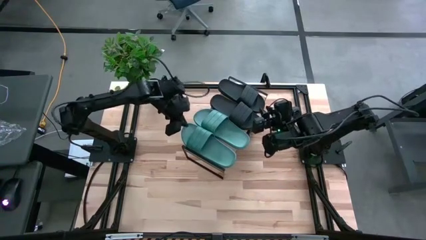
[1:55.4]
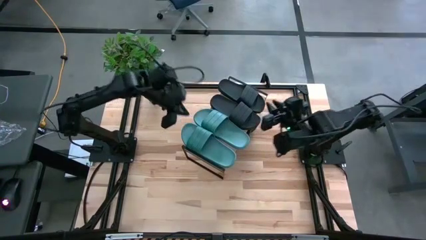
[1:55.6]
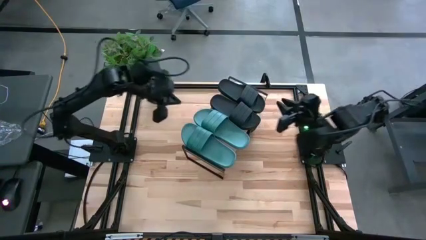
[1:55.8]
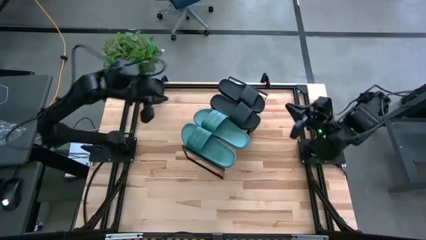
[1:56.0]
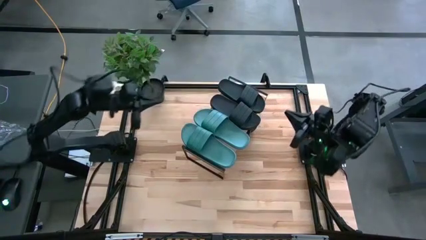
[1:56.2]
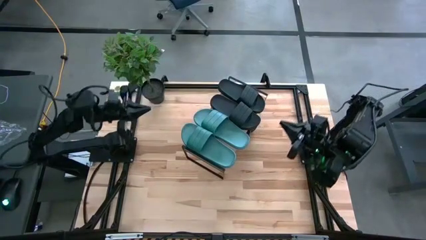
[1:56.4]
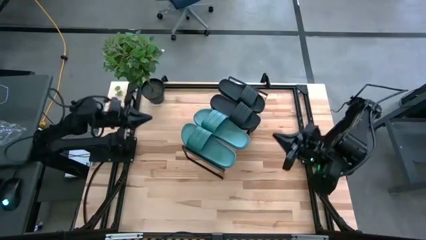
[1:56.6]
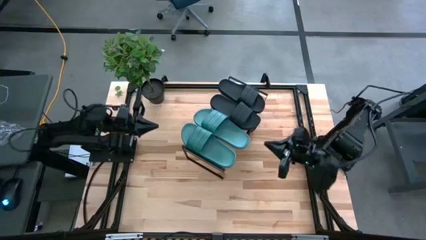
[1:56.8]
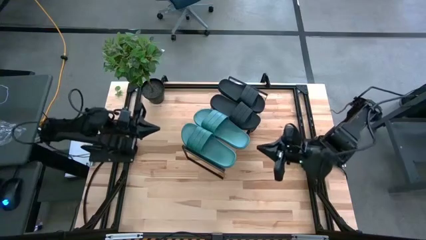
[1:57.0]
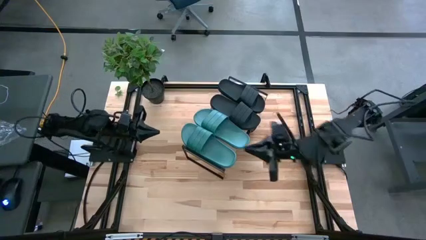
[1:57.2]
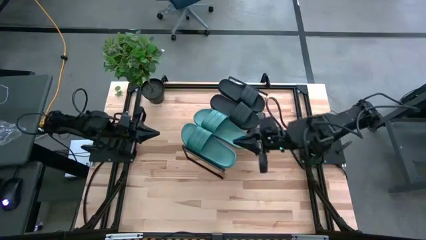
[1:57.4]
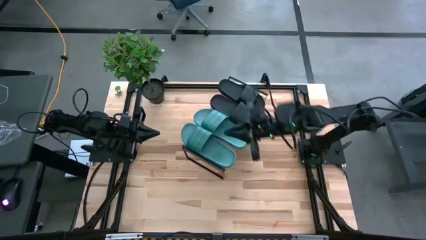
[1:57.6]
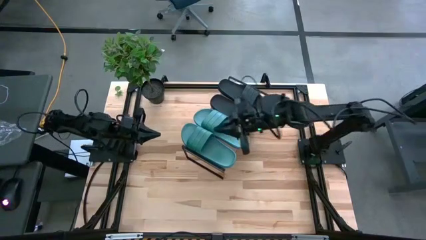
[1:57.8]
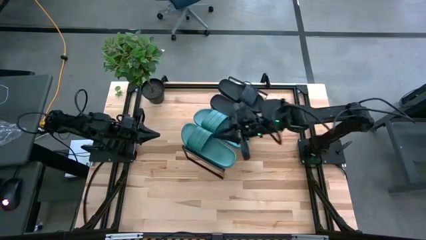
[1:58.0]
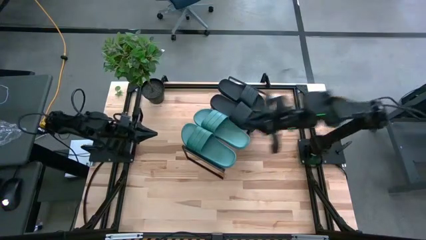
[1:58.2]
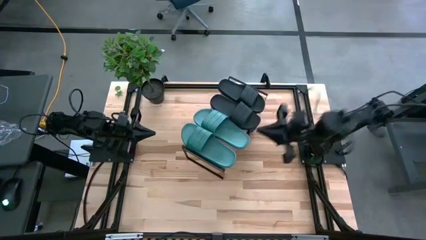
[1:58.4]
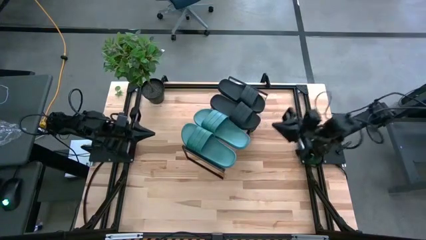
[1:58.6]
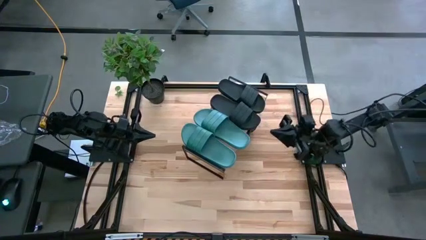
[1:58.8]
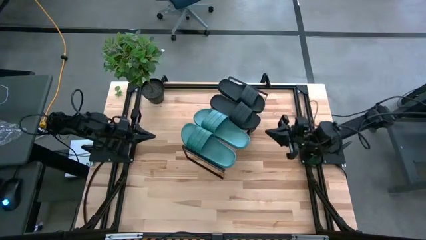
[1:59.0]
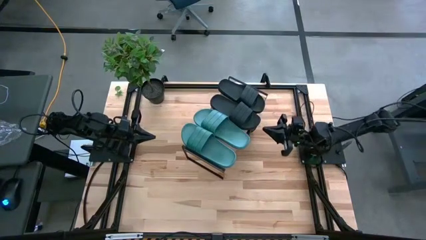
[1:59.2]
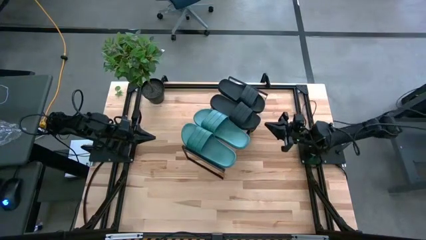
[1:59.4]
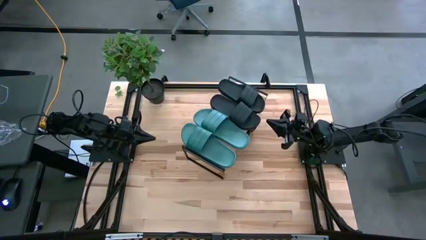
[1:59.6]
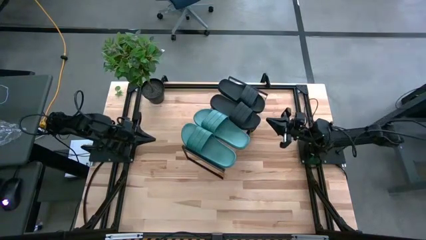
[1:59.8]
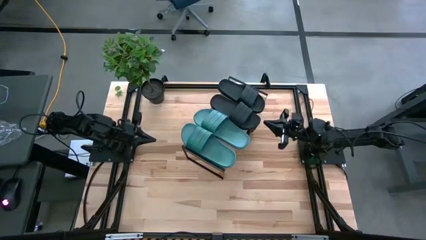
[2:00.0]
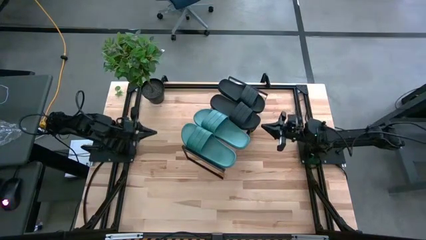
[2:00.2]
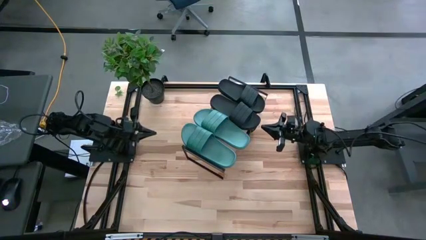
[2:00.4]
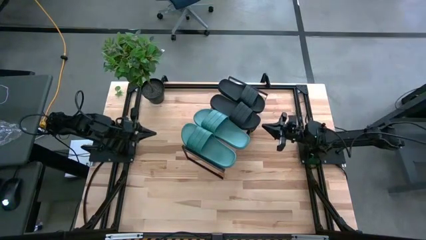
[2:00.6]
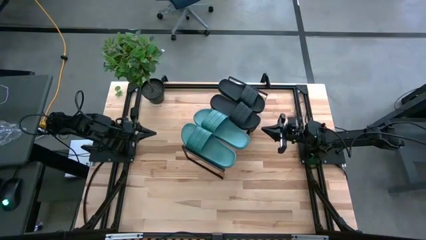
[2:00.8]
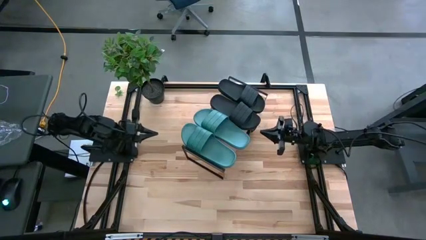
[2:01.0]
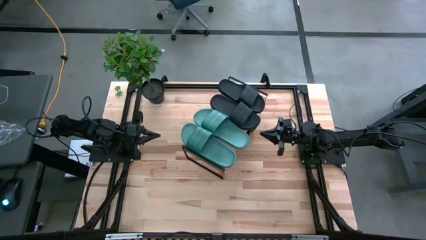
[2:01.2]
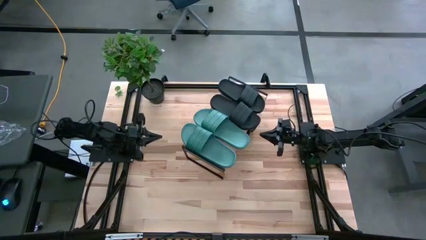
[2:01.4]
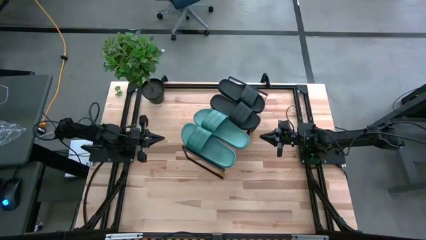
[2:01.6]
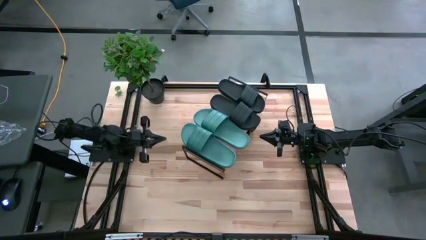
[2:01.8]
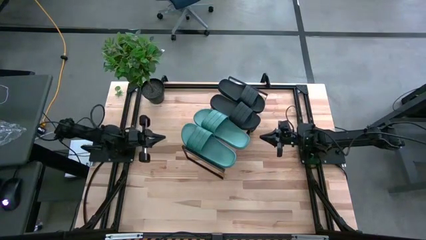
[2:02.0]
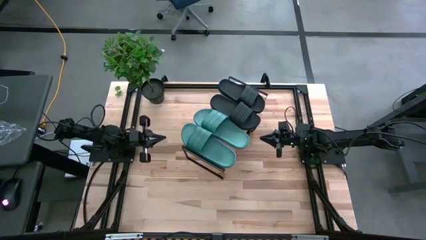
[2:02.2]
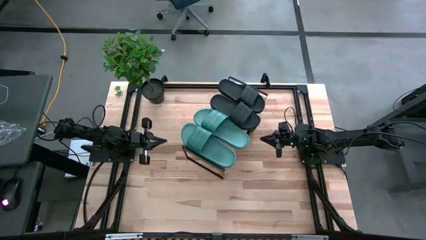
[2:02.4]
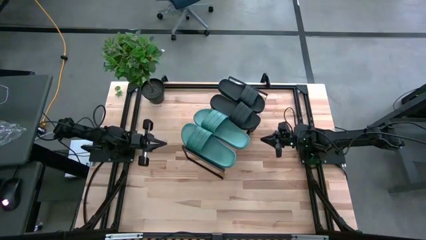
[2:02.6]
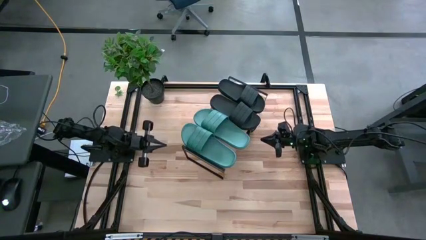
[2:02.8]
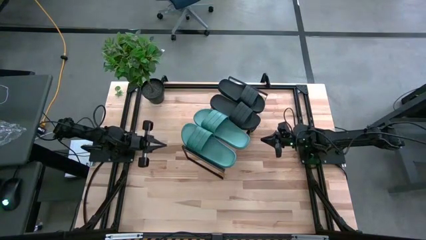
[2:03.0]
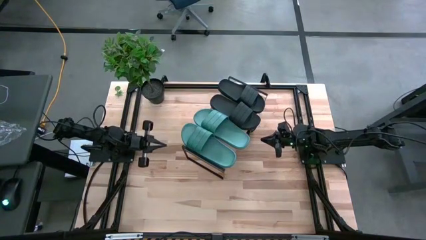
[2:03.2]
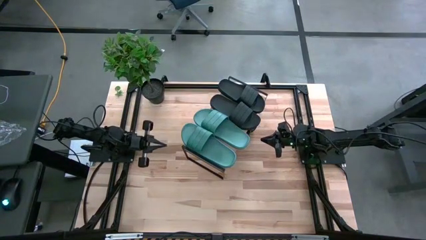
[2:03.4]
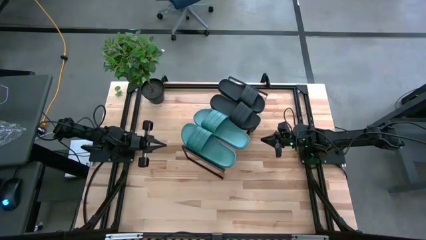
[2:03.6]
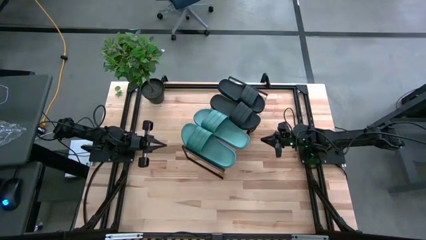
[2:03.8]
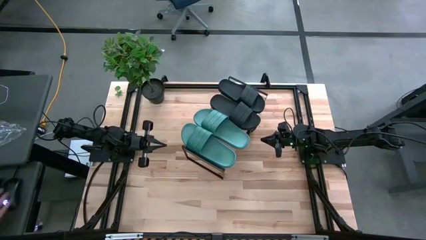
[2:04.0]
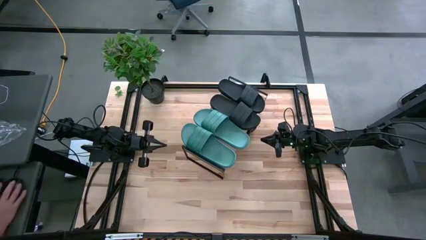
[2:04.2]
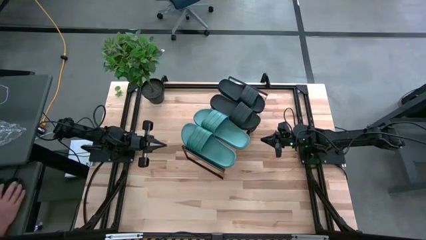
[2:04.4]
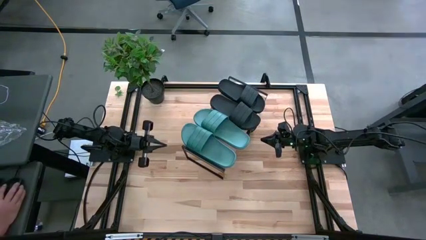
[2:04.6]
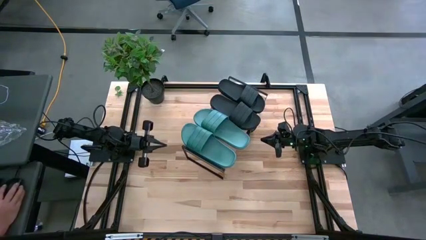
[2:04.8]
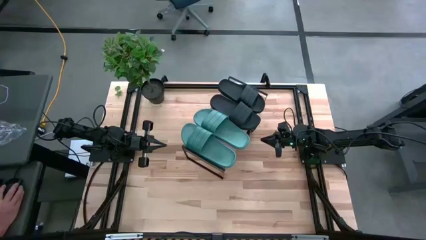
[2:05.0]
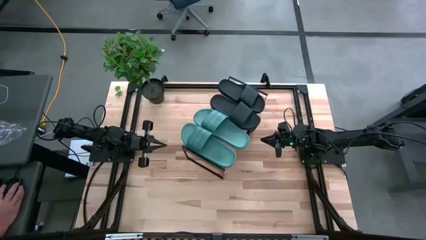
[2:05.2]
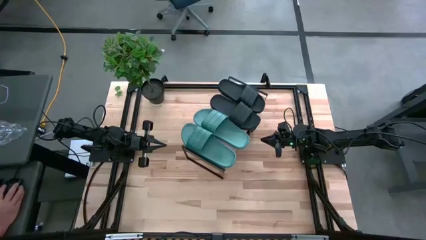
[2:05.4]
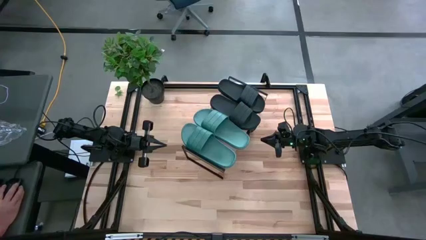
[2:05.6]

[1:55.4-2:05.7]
Task: Pick and place slides into the shelf
Return to Home Position

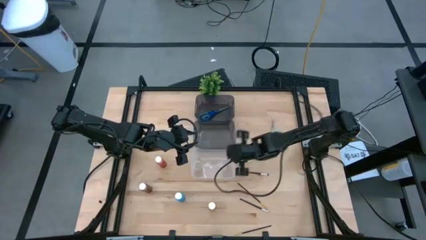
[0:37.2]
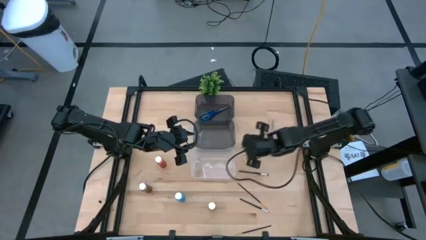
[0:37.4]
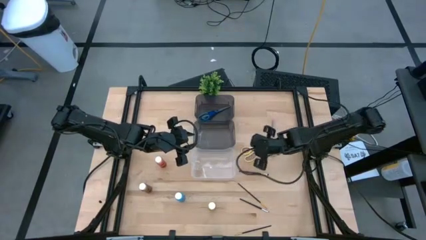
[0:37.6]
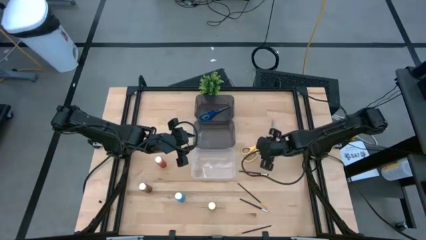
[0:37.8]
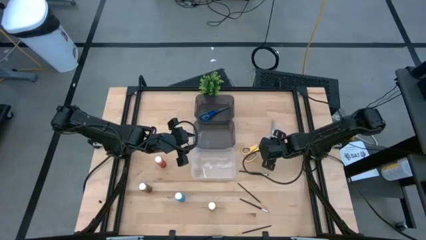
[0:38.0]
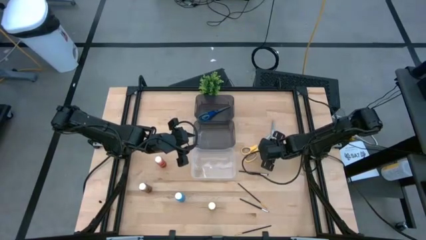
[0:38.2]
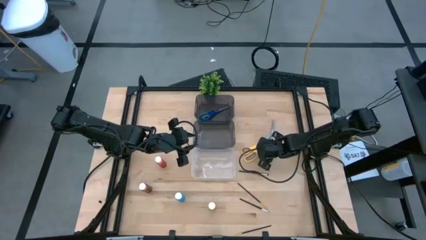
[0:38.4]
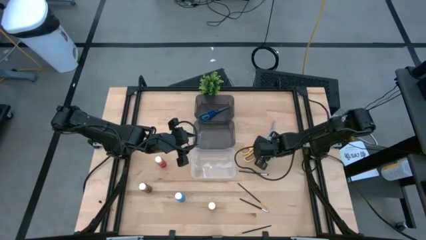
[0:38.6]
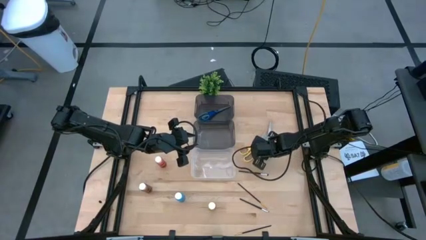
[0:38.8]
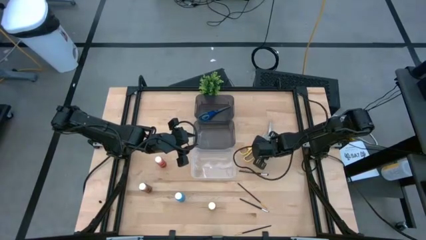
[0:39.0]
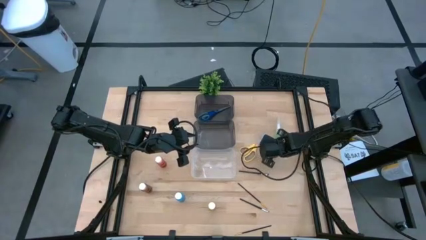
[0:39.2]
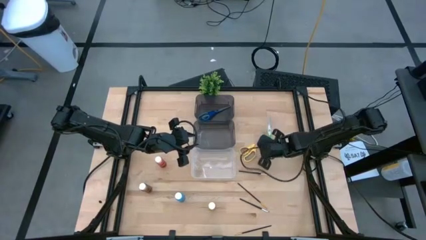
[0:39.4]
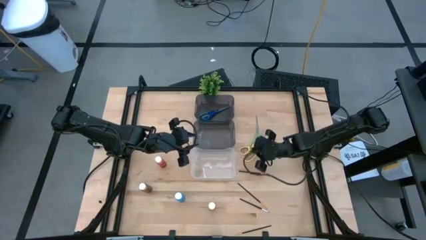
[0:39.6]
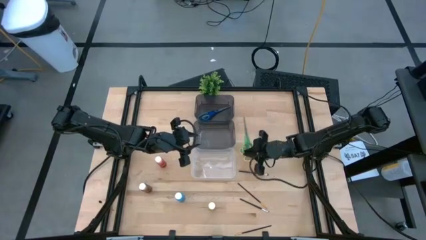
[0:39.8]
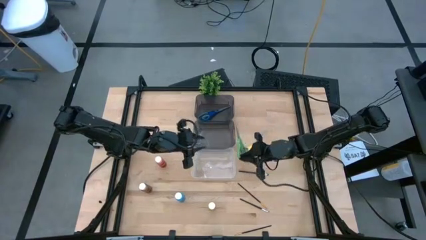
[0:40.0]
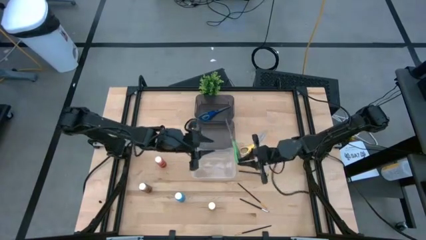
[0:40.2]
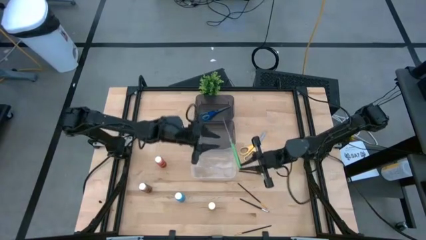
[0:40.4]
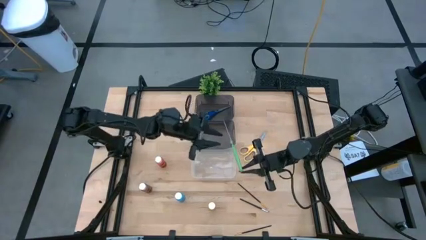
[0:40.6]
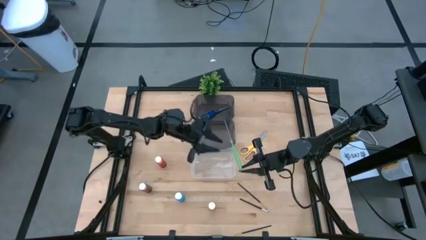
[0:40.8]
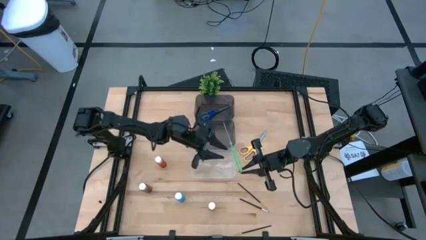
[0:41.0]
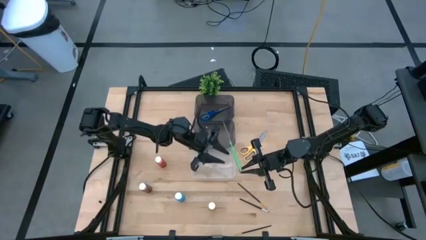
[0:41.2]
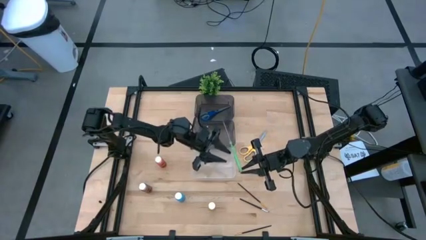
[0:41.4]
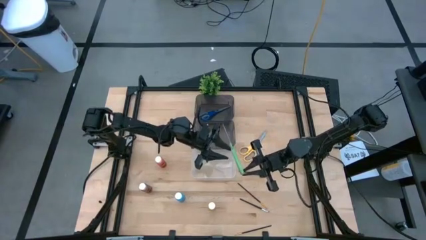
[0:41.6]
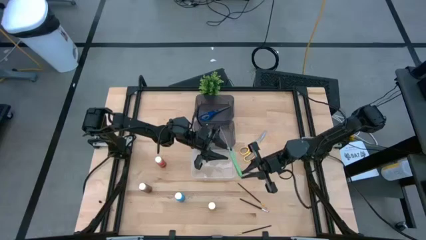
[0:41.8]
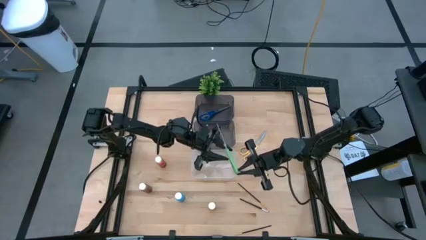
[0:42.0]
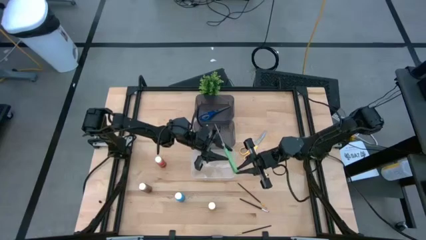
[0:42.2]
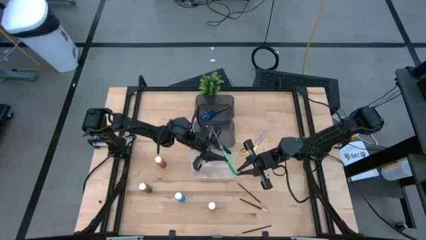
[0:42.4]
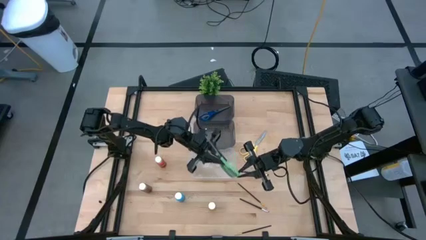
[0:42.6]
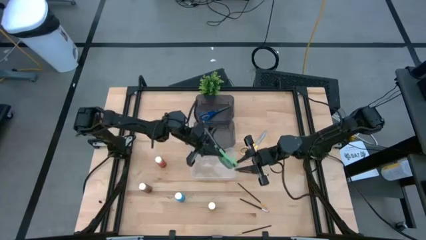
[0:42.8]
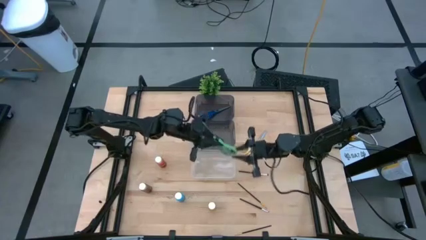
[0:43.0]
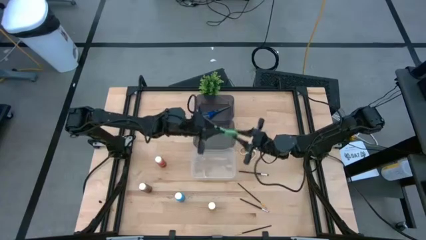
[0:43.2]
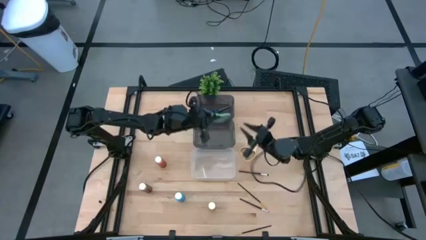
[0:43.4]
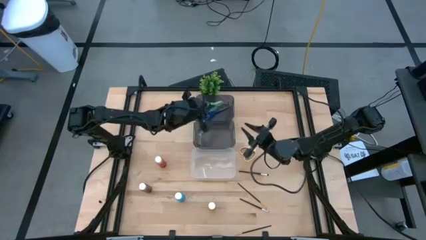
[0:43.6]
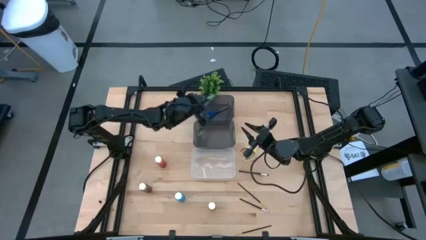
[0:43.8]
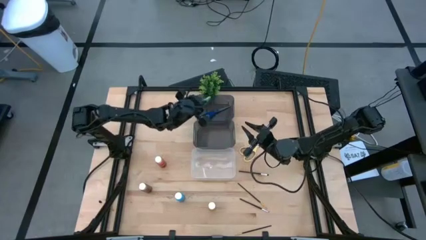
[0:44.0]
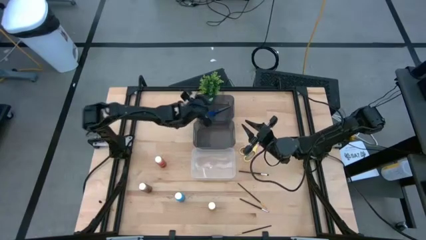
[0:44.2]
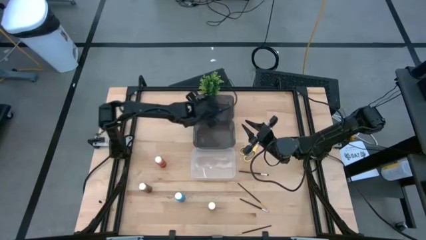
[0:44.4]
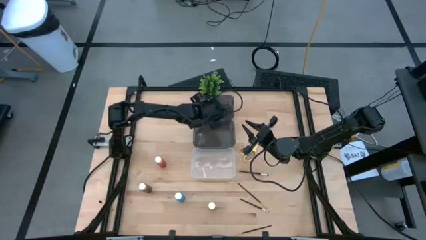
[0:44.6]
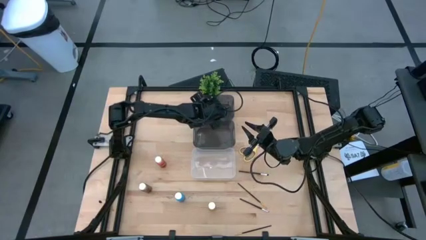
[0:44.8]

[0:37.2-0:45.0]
Task: Pick & Place Paint Supplies
Put the green scissors into the top black bin
